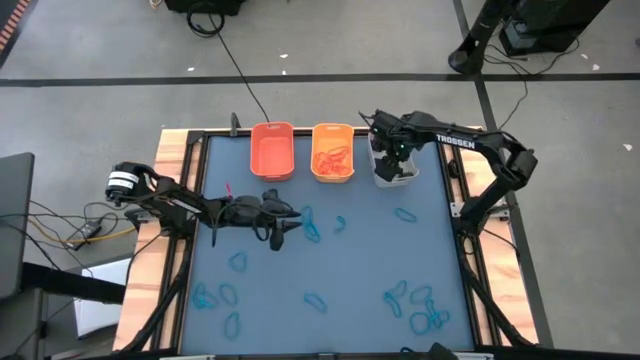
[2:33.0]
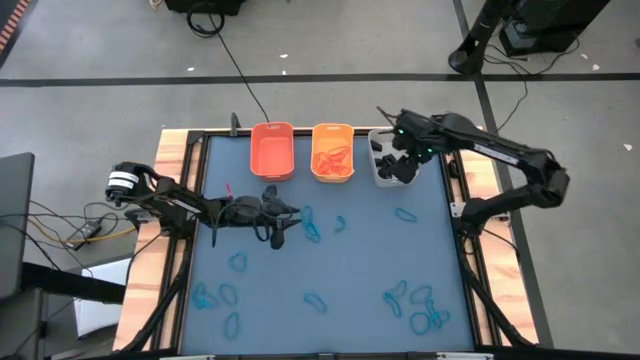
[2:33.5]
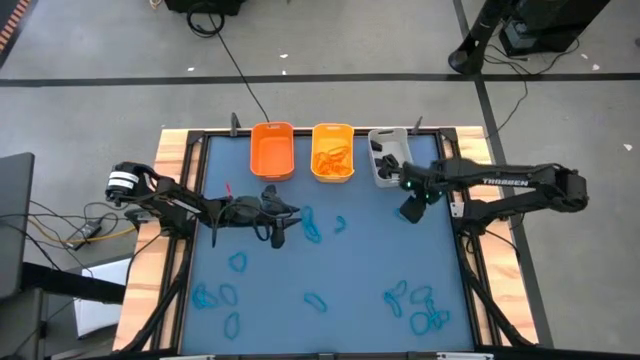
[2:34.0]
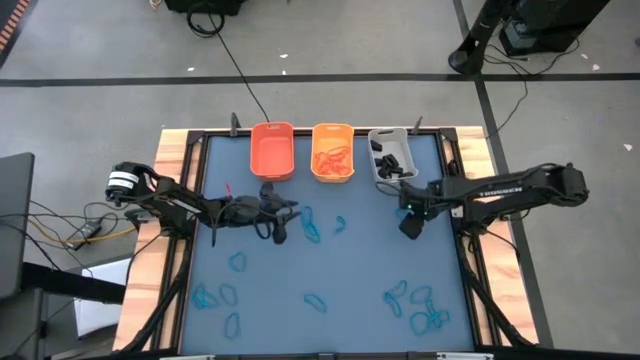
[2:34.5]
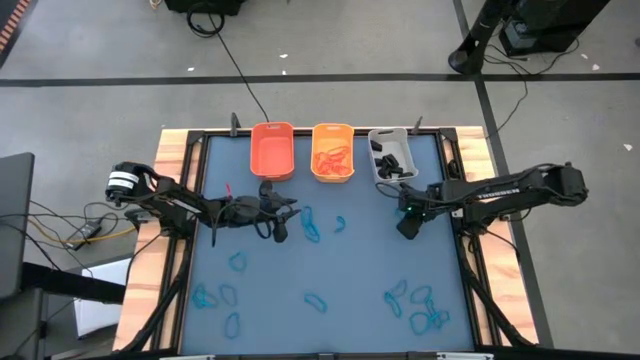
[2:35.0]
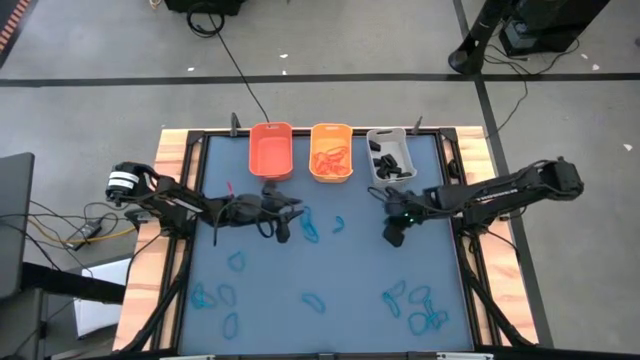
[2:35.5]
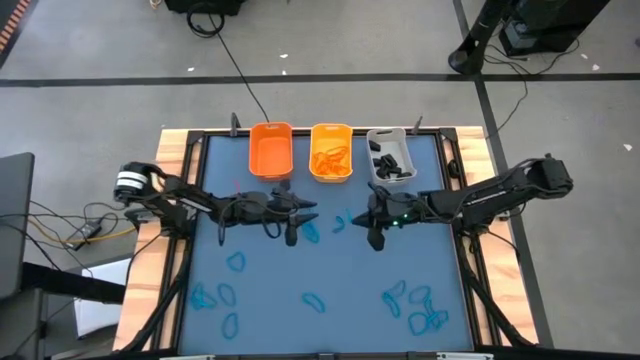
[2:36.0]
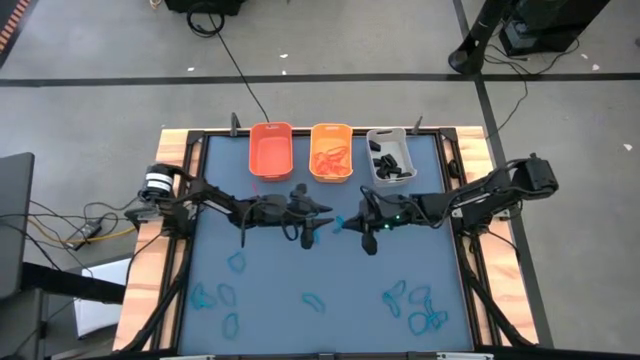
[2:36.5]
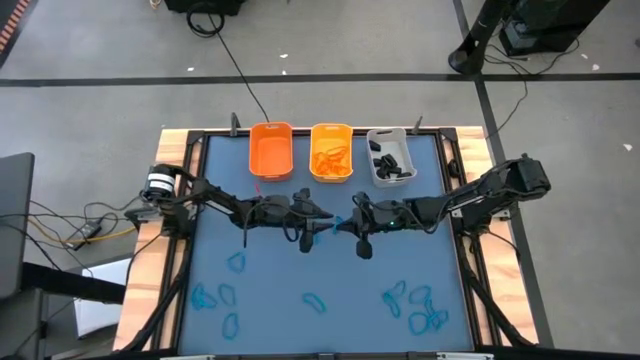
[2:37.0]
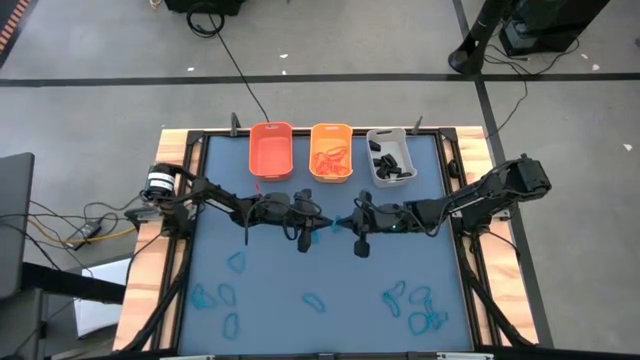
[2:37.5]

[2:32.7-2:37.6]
Task: Sort rubber bands into baskets
Put the blue rubber band into the orange bin

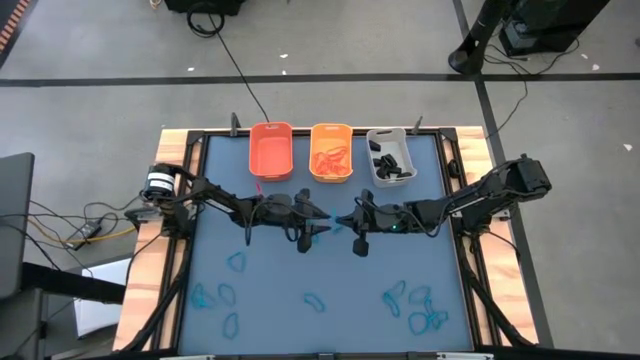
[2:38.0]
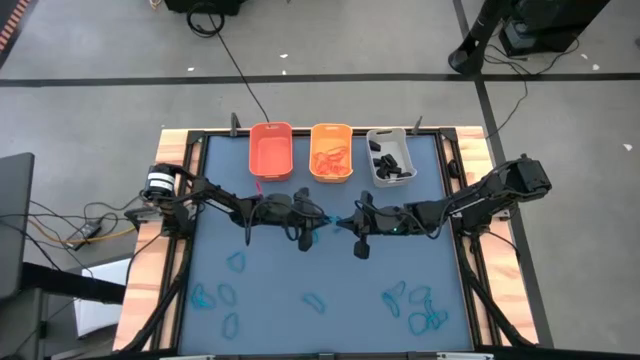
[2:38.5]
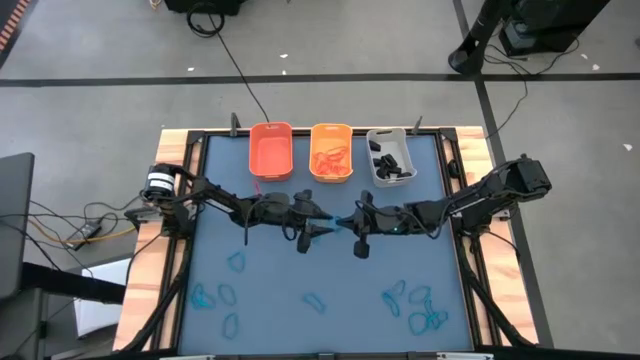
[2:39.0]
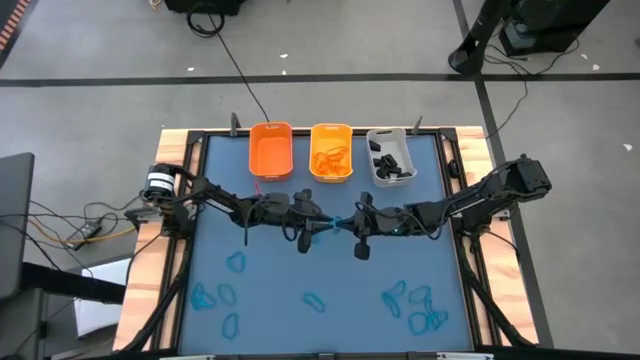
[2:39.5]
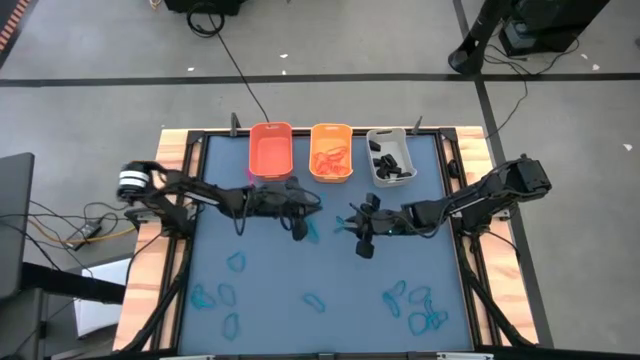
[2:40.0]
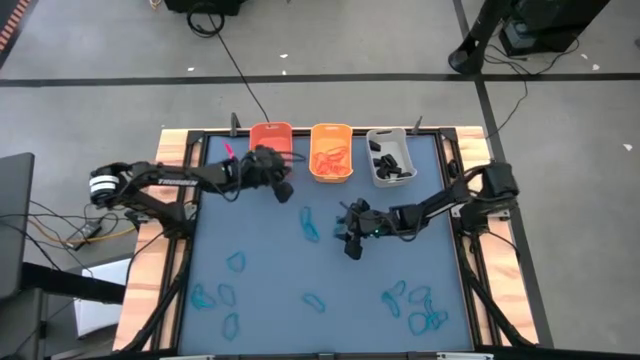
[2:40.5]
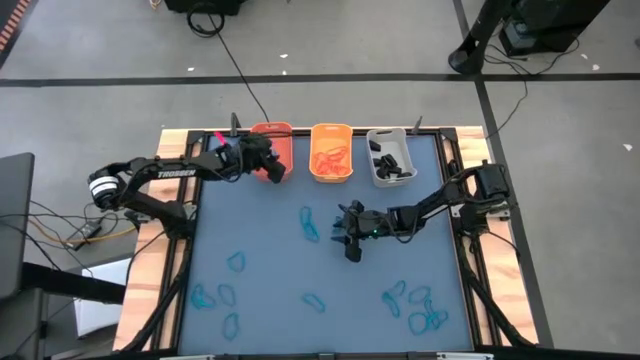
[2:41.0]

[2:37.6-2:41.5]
Put the blue rubber band into the orange bin

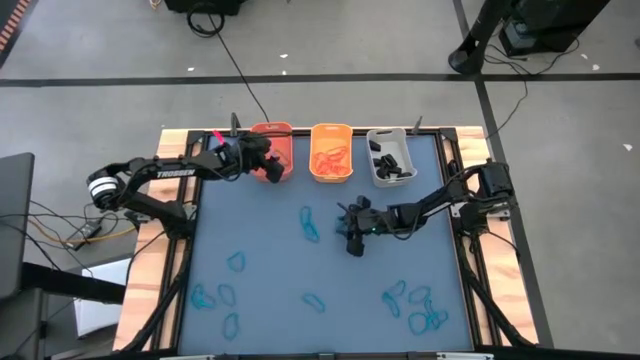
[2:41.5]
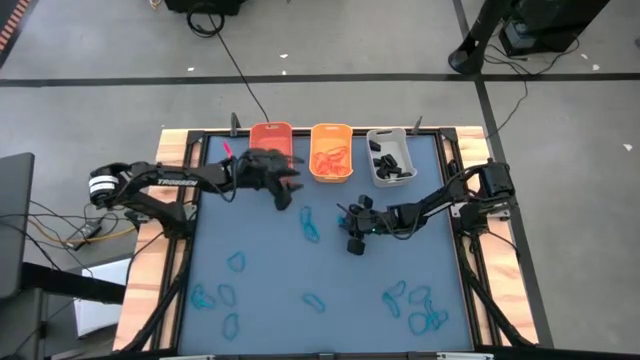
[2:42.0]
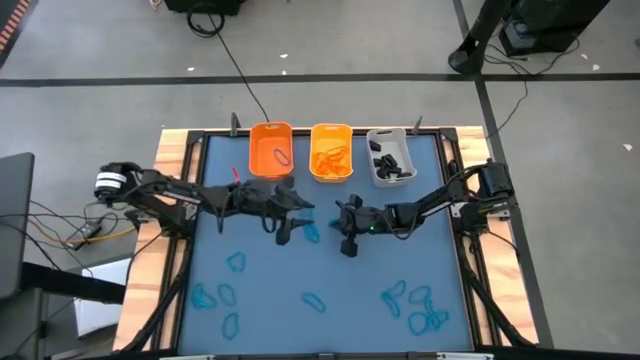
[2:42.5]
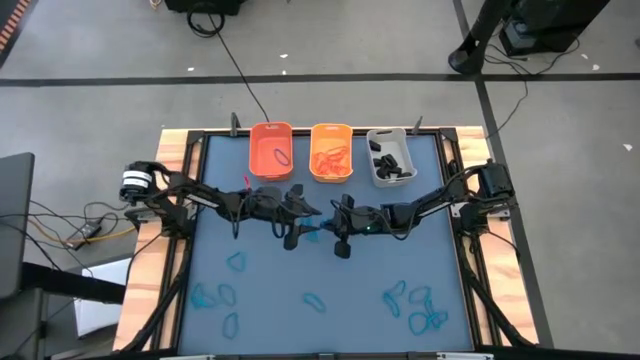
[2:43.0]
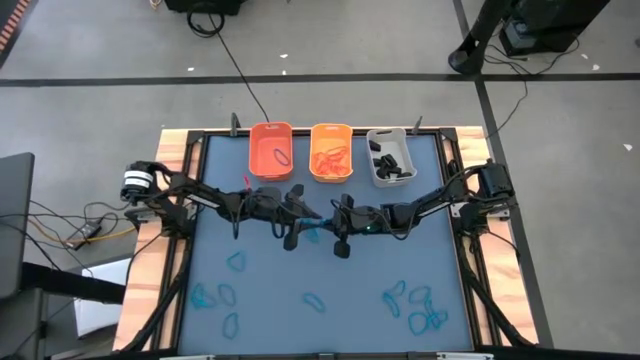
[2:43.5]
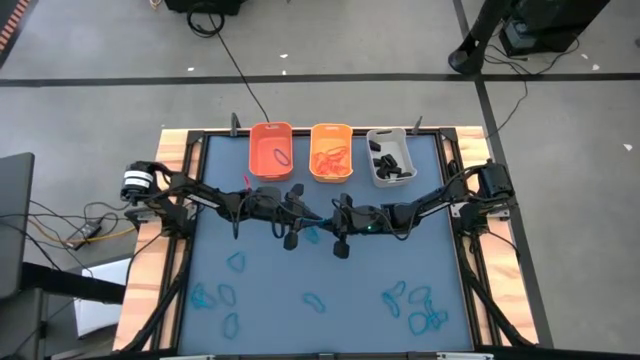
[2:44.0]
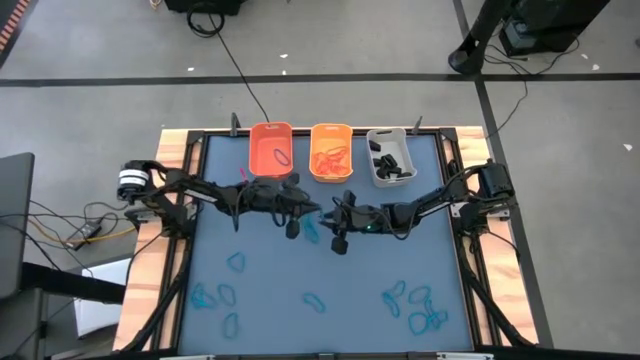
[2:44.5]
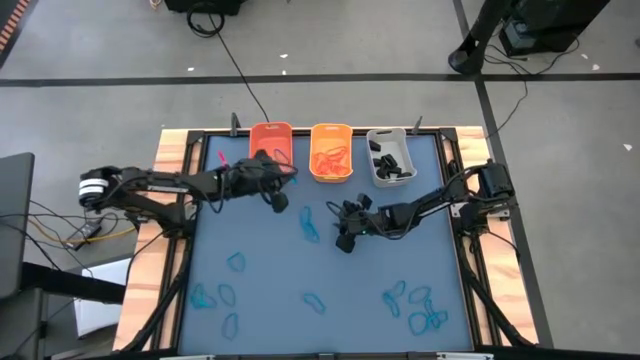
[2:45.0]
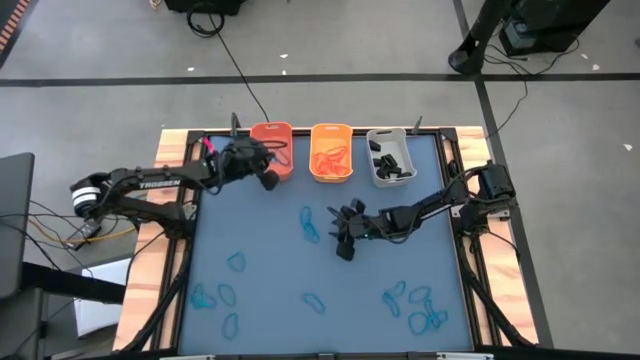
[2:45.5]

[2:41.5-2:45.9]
Put the blue rubber band into the orange bin

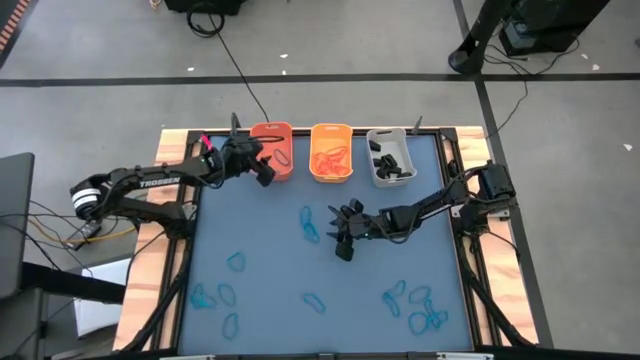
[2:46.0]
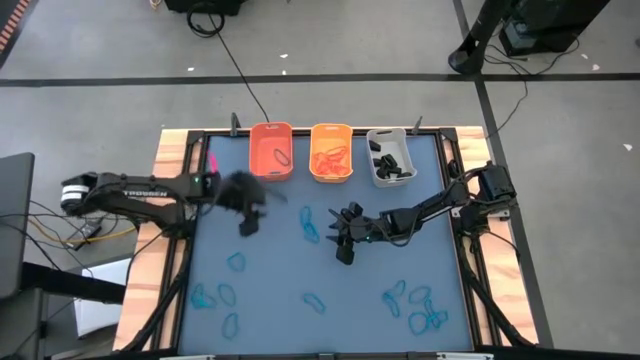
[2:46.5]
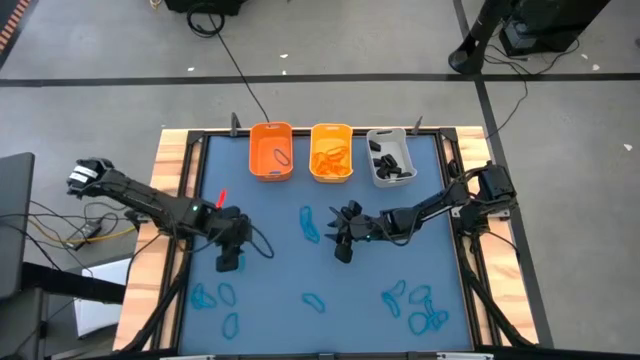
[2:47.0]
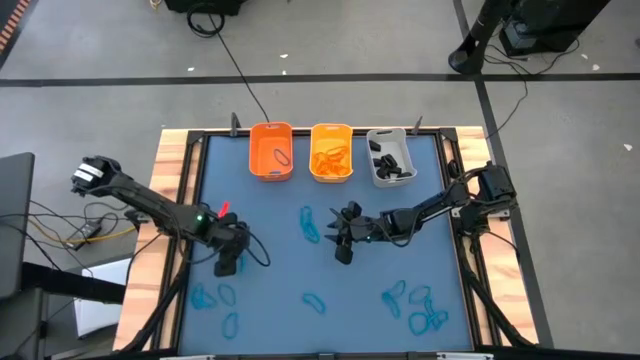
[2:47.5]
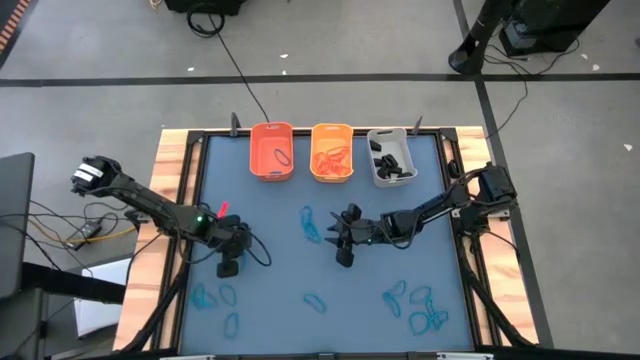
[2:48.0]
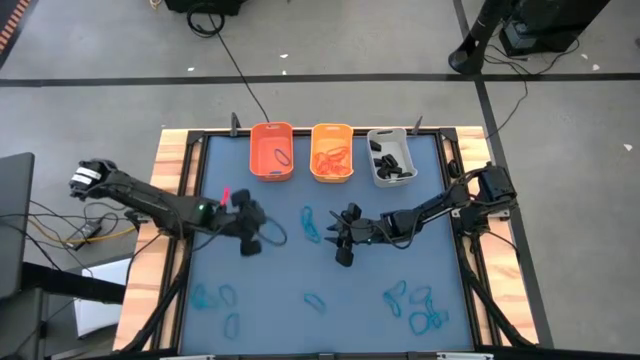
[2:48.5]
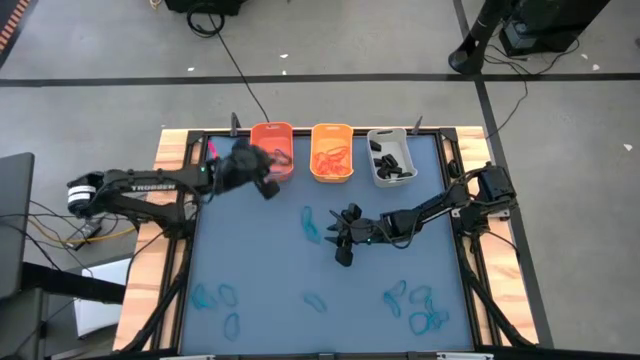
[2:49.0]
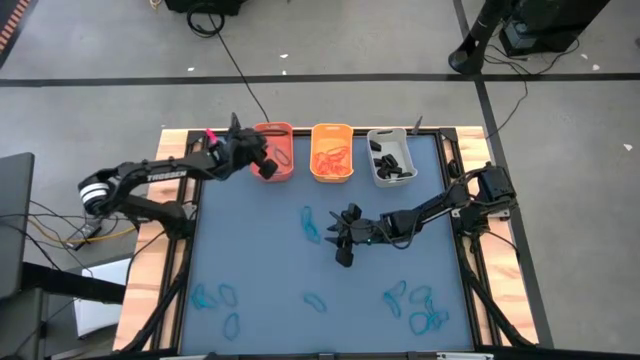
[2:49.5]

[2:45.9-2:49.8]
Put the blue rubber band into the orange bin

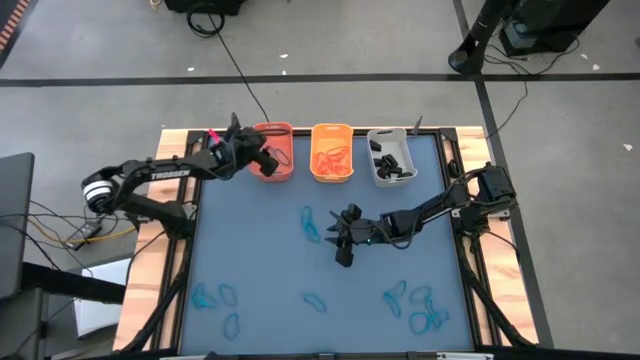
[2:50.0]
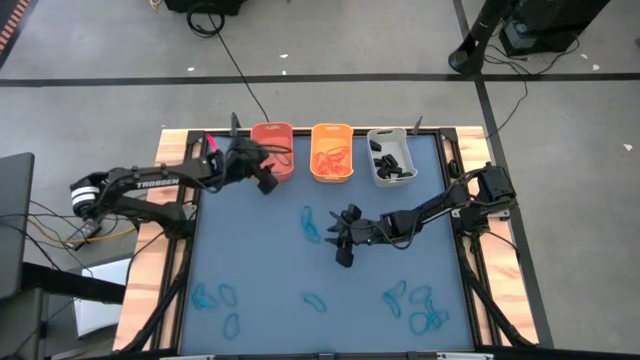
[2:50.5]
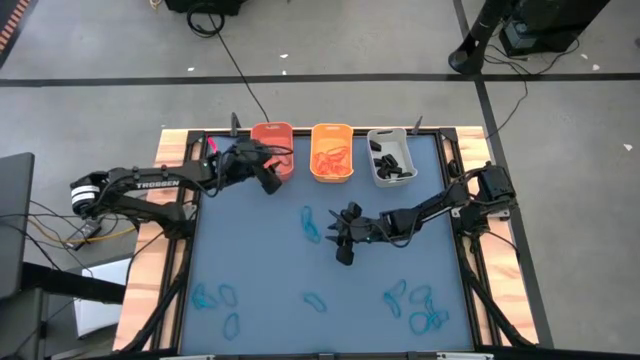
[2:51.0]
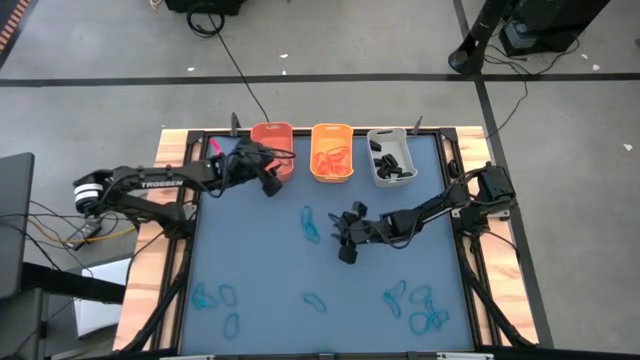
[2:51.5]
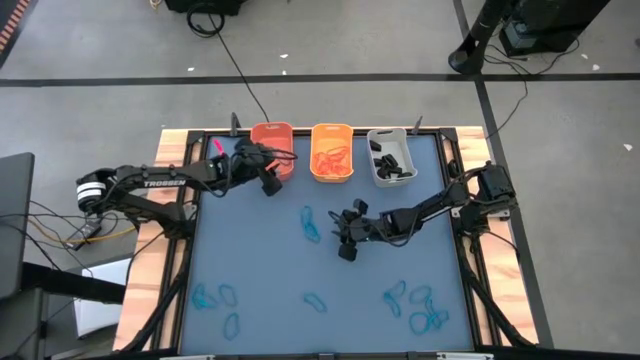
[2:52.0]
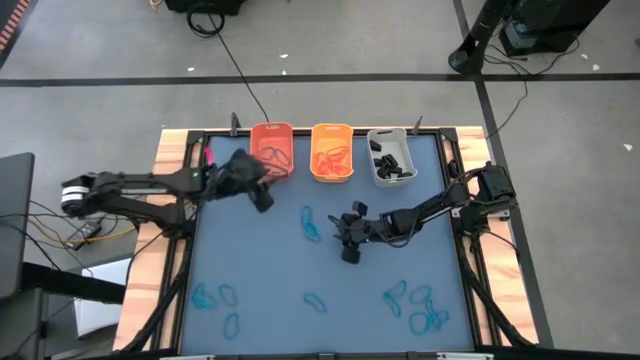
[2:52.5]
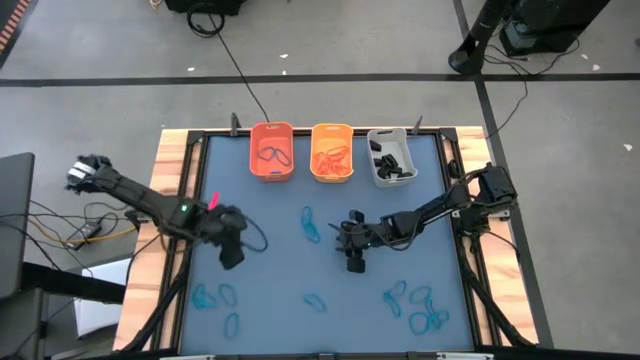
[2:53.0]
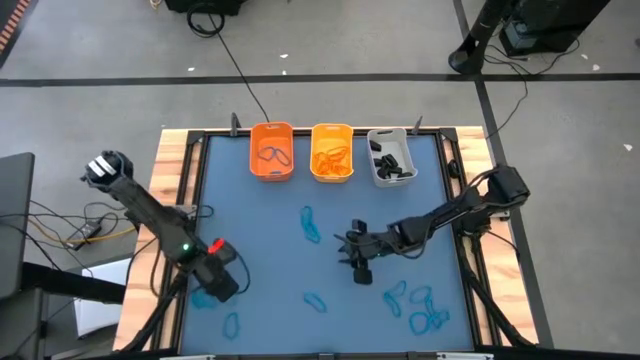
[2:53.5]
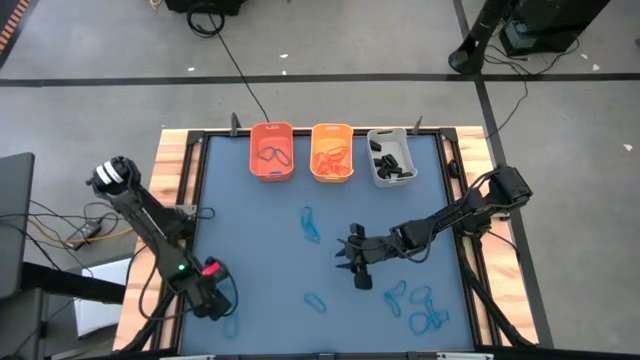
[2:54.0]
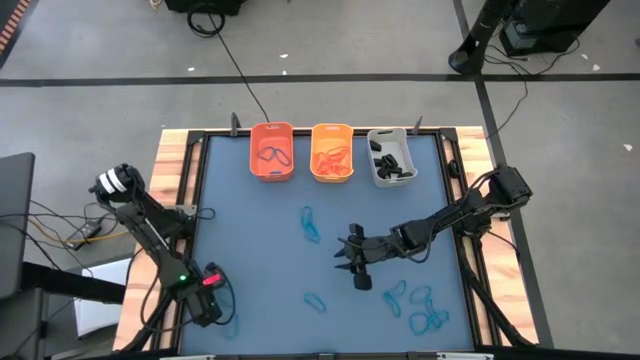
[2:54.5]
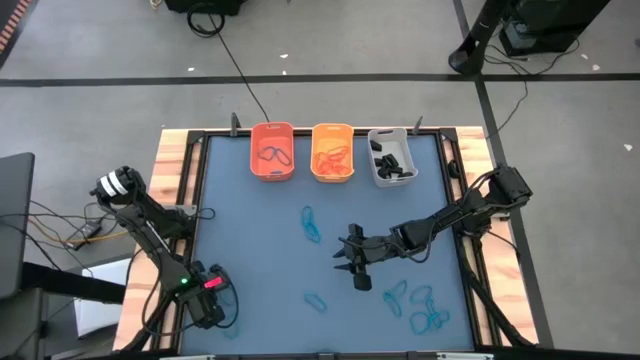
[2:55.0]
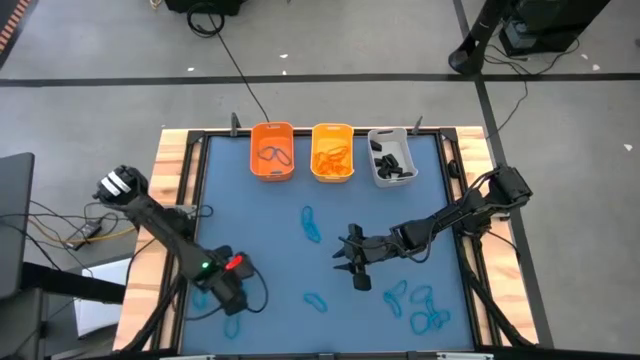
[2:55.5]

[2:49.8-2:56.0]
Put the blue rubber band into the orange bin
